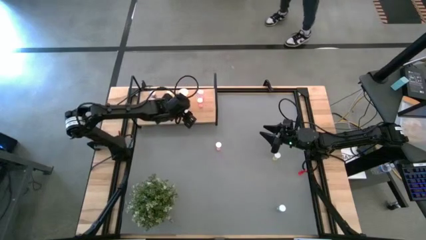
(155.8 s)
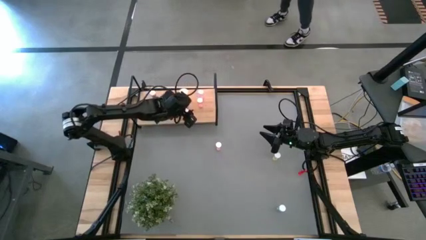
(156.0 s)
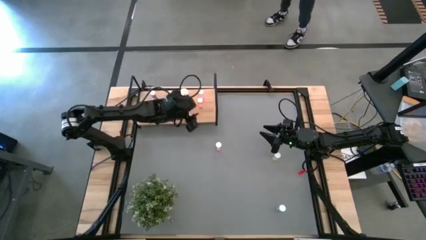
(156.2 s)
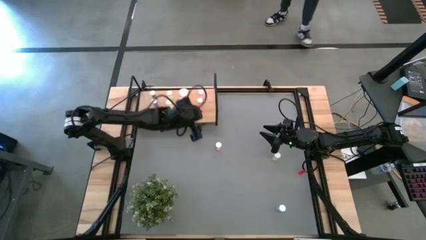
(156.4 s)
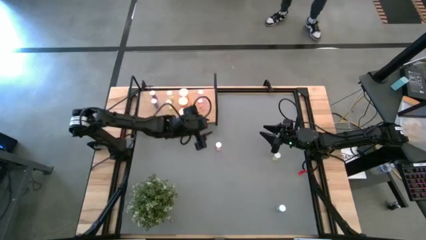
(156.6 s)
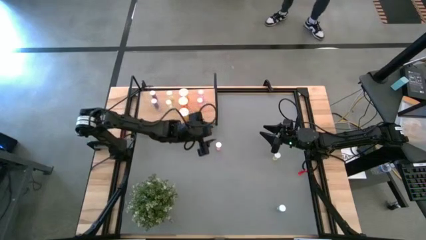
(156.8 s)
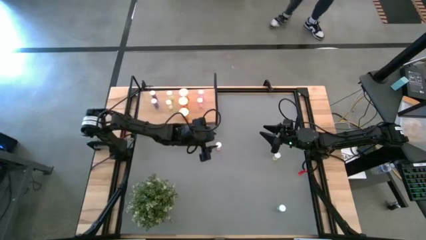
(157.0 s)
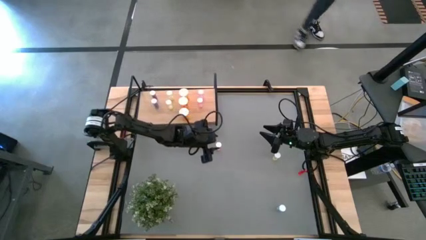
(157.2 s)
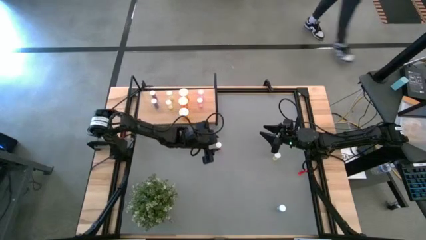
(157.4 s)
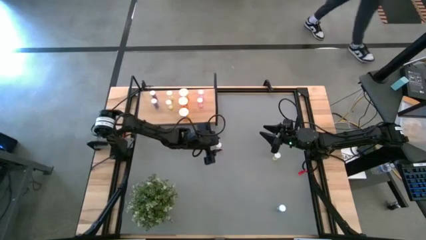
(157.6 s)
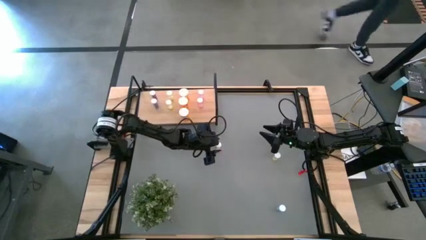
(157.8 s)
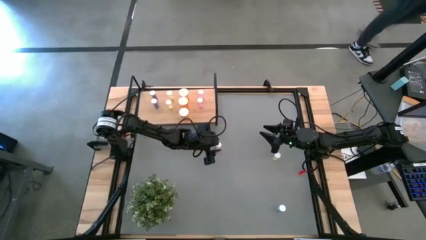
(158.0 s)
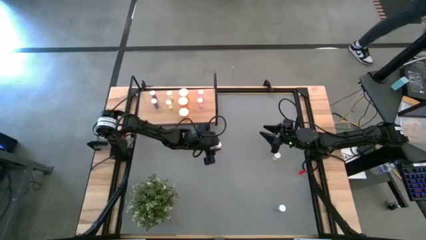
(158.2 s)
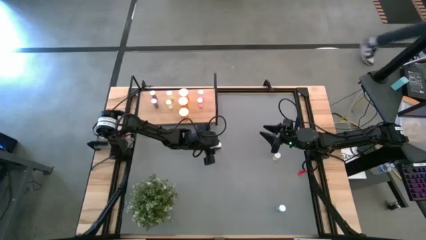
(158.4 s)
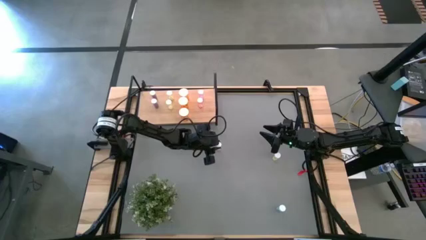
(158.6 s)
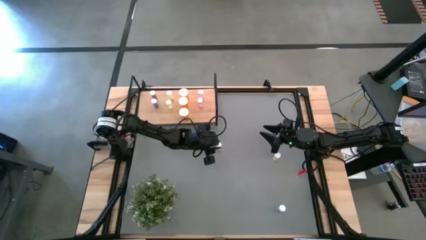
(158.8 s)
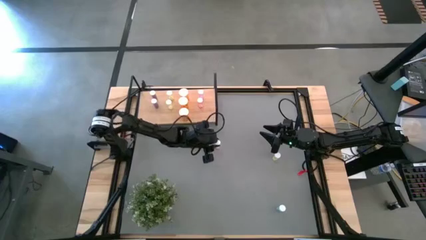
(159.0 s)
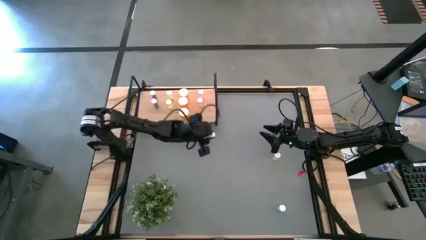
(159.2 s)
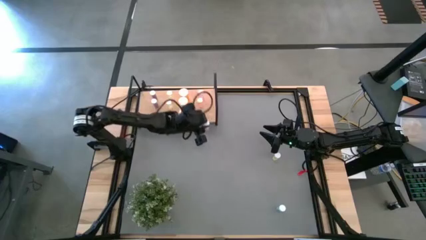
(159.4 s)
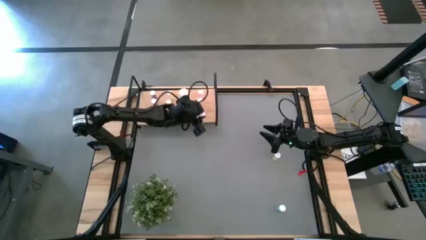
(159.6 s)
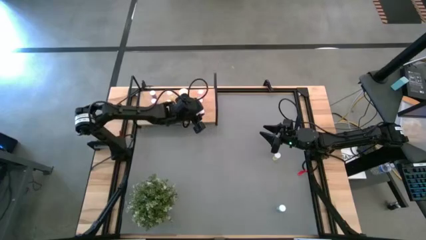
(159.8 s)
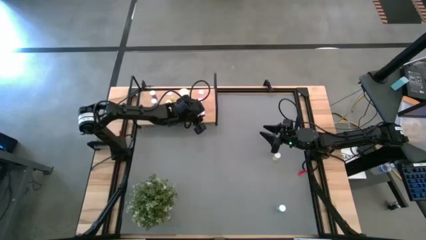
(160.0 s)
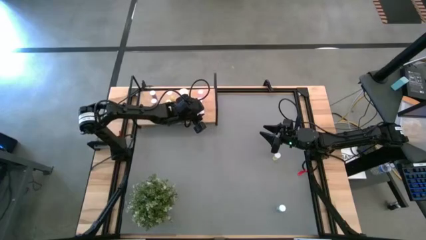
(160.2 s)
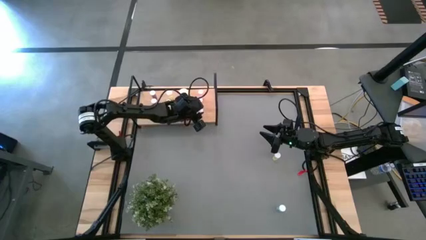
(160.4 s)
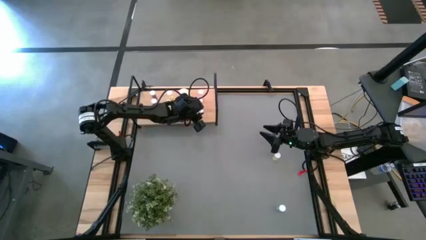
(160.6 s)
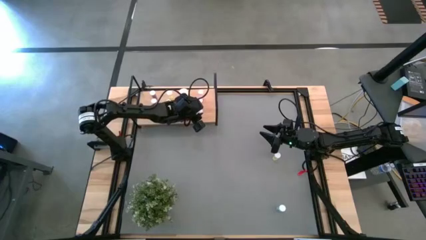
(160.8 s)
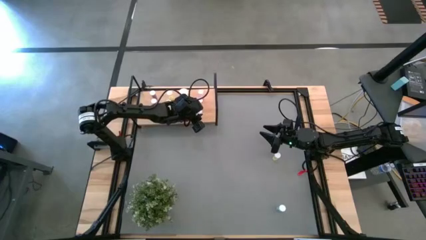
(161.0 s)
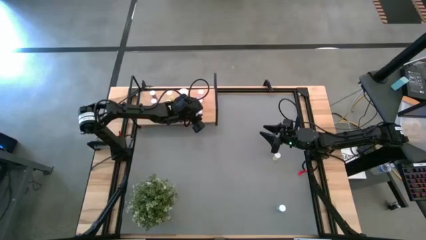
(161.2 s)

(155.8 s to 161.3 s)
Task: Pick and place medicine bottles onto shelf by color
Put the pink pill bottle on the shelf

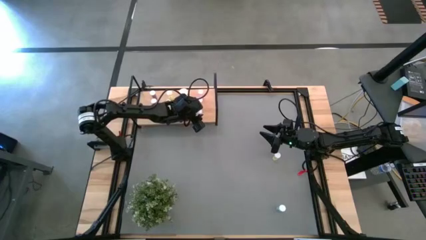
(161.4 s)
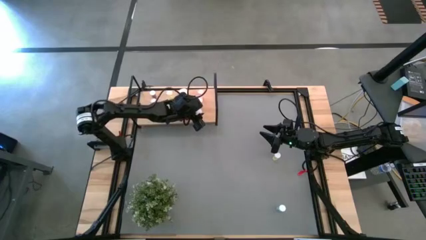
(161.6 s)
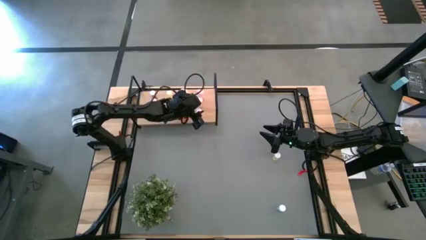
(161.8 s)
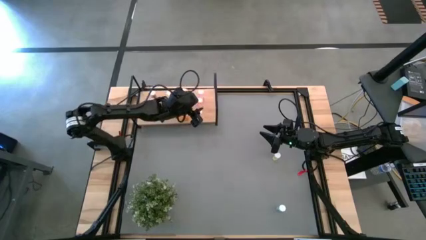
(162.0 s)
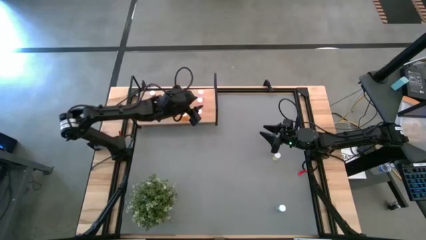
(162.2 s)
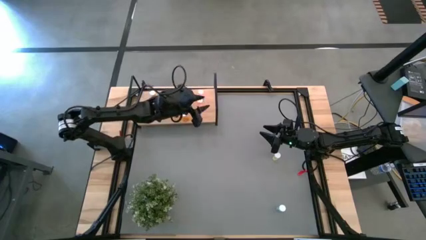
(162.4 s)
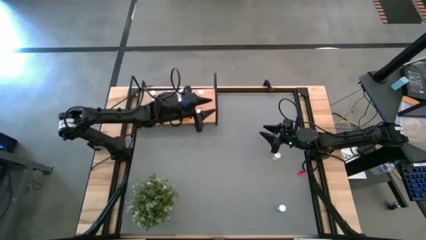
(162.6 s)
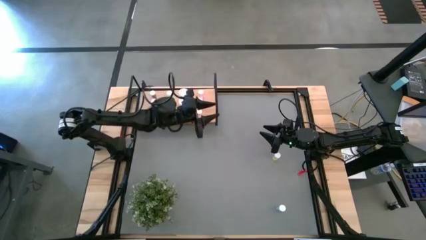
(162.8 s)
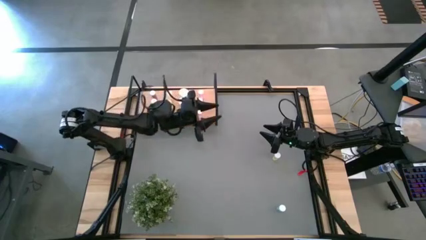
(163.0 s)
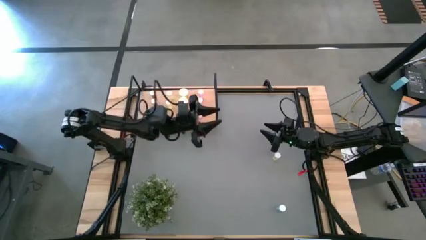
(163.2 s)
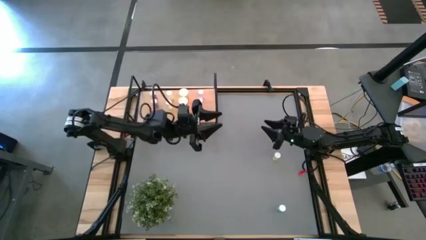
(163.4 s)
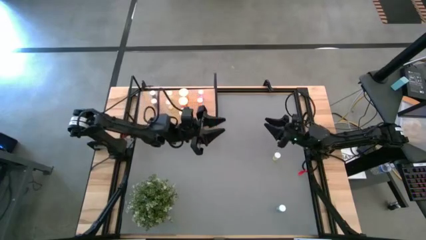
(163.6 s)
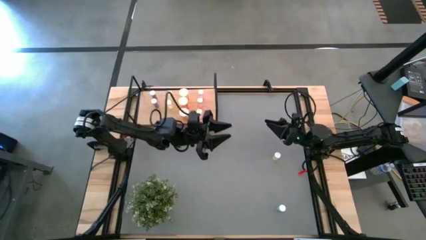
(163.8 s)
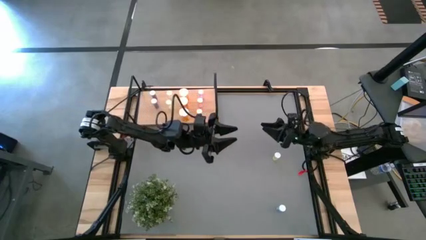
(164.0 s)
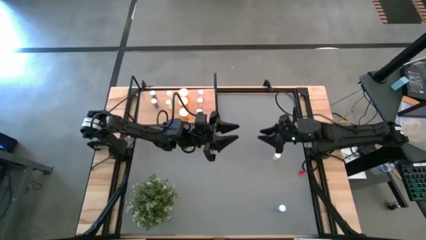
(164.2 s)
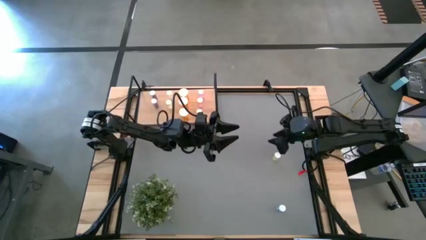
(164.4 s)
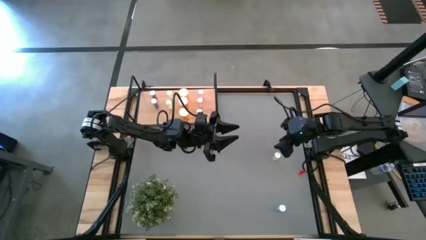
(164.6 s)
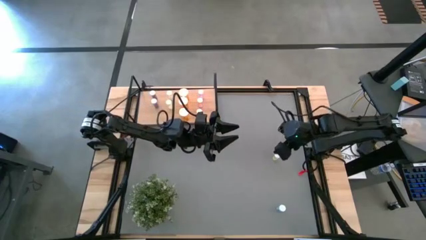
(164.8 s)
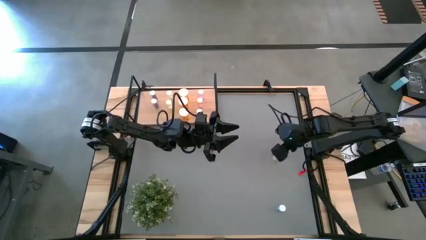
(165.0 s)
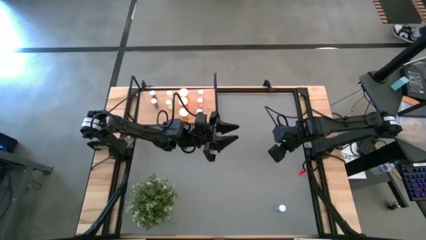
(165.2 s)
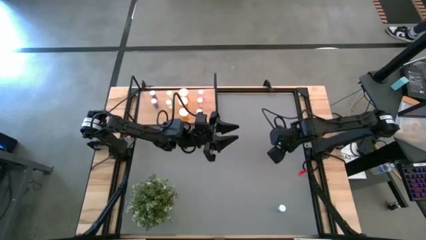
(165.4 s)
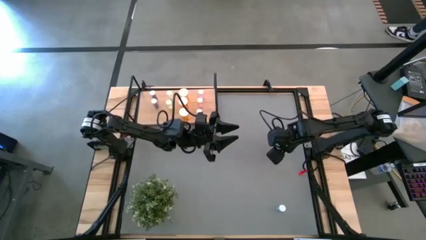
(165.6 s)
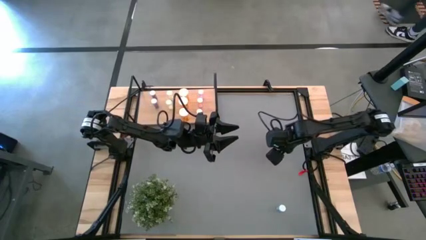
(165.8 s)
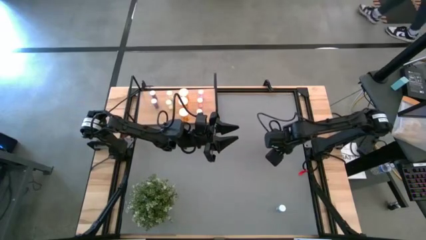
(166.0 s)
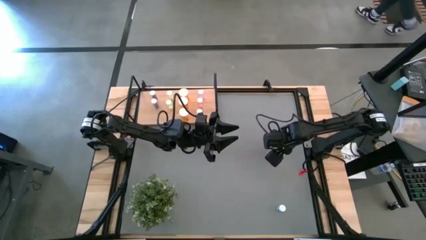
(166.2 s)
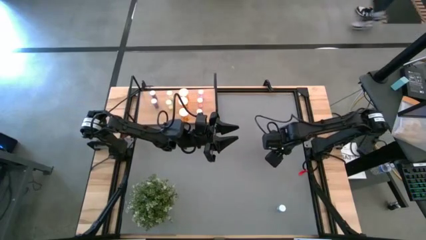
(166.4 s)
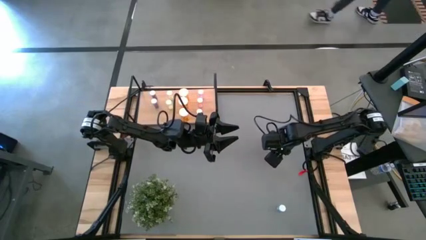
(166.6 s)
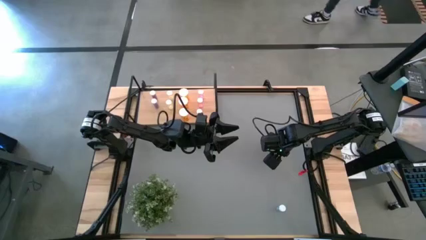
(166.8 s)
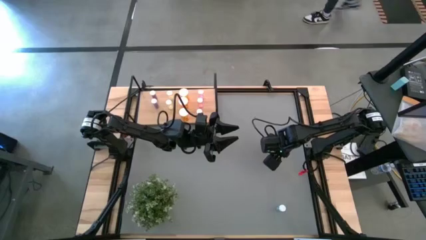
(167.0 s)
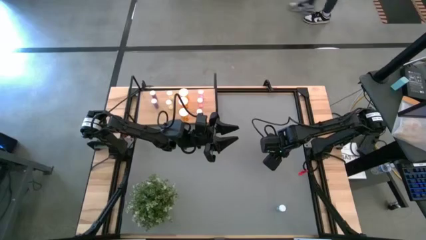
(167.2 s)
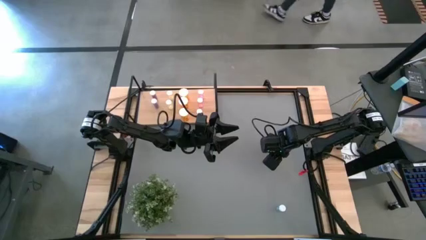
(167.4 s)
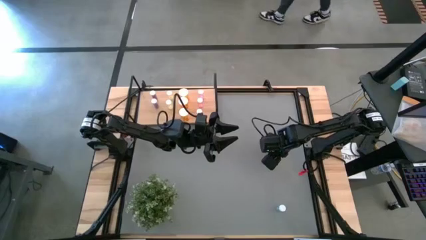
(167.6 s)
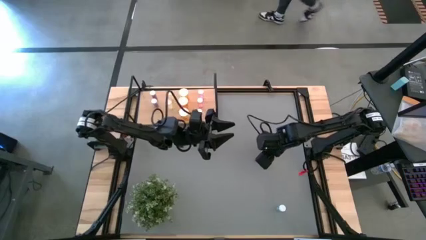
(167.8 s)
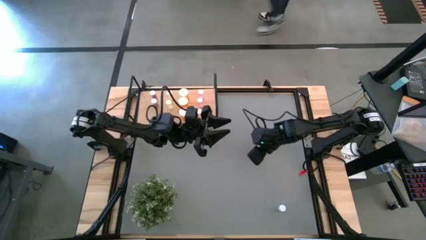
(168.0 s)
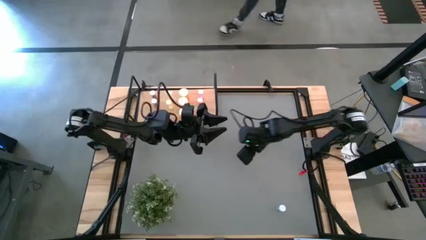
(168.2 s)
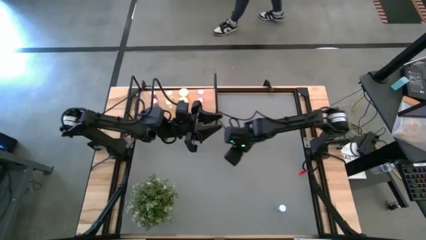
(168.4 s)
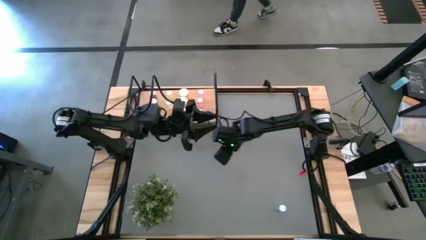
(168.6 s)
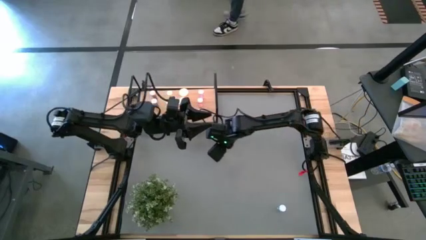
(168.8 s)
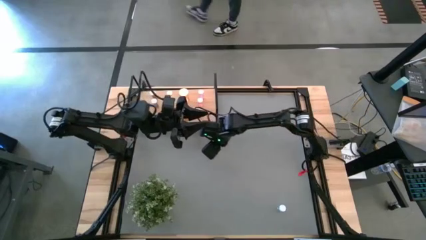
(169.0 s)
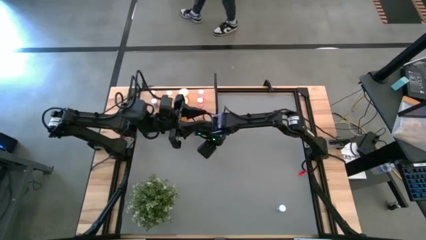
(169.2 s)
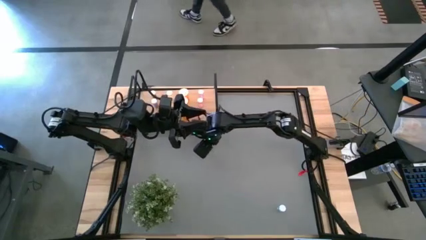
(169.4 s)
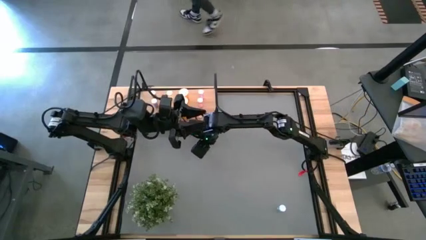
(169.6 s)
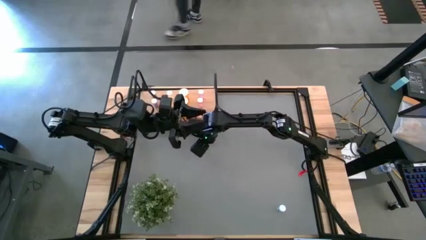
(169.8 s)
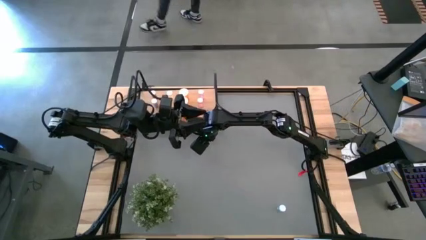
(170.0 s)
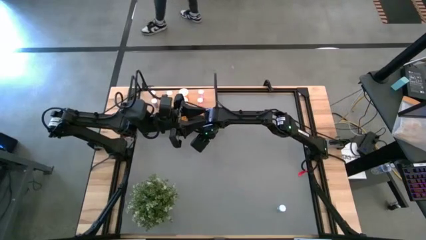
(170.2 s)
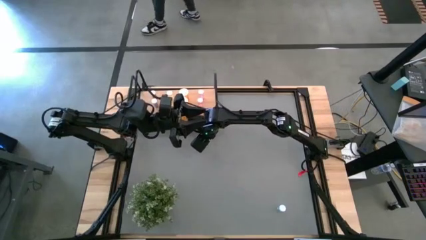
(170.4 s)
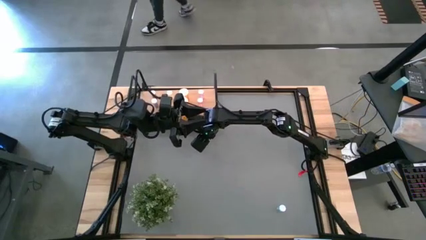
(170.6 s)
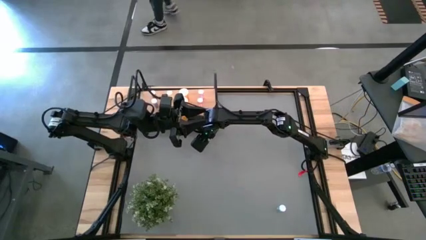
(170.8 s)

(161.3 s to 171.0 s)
Move the yellow pill bottle to the middle of the table
